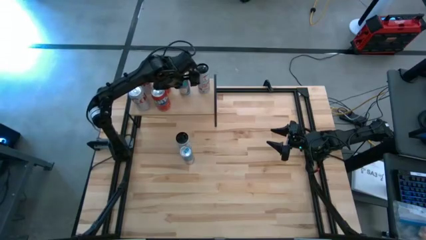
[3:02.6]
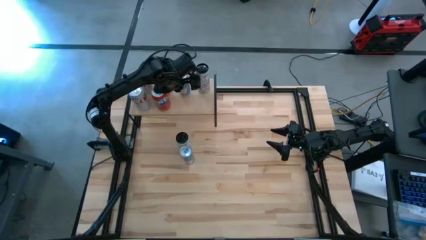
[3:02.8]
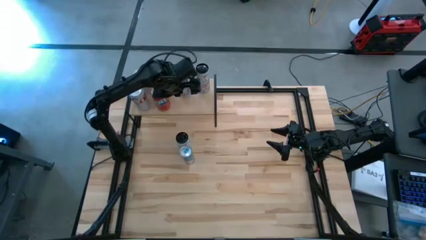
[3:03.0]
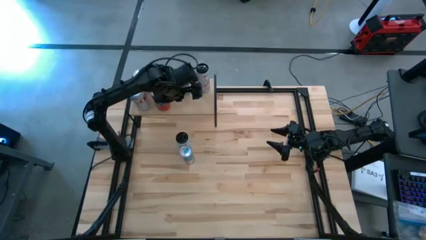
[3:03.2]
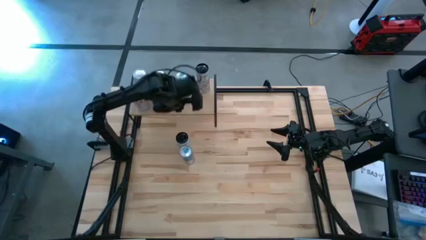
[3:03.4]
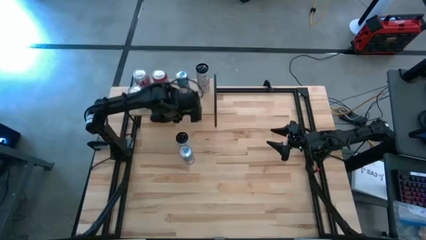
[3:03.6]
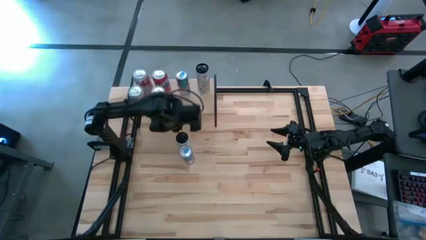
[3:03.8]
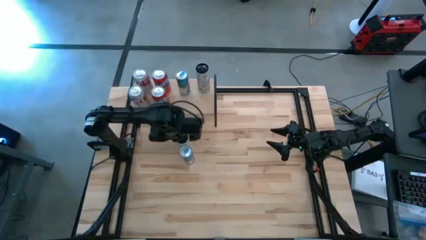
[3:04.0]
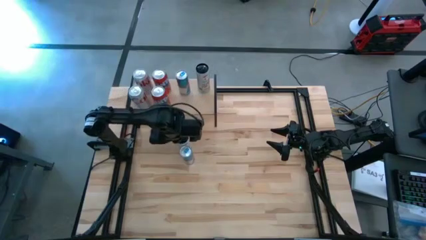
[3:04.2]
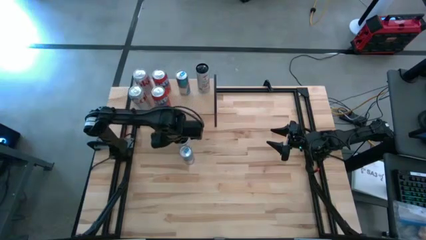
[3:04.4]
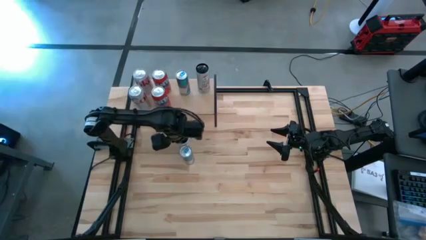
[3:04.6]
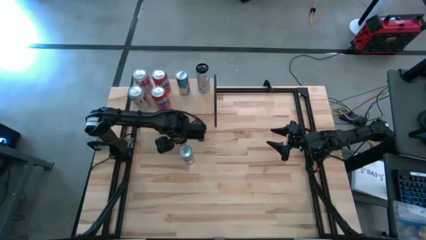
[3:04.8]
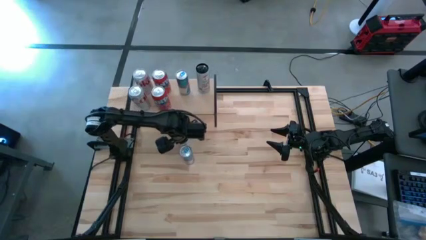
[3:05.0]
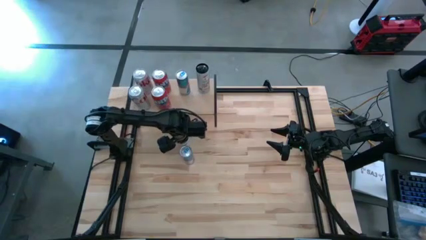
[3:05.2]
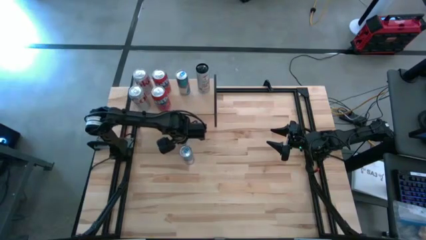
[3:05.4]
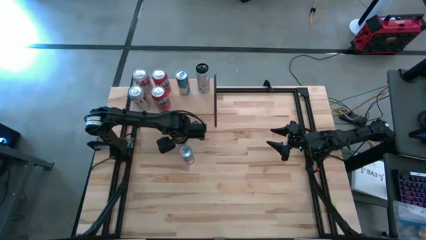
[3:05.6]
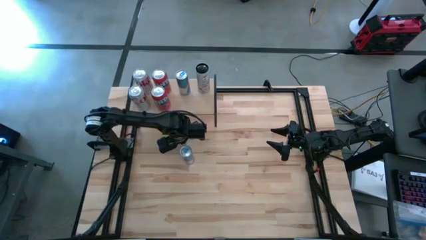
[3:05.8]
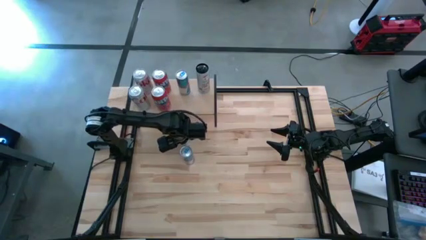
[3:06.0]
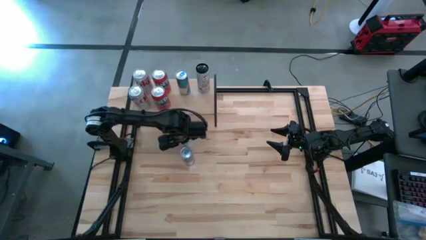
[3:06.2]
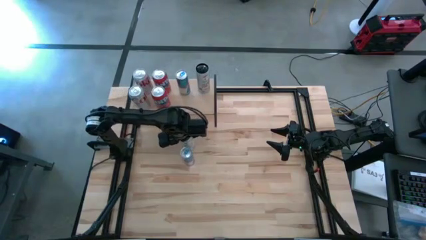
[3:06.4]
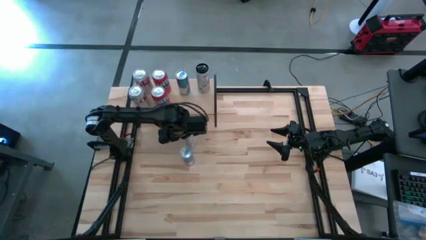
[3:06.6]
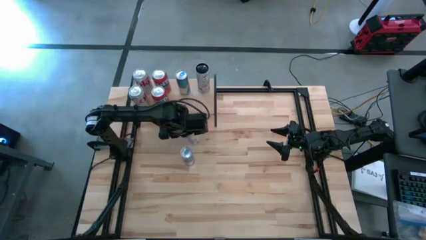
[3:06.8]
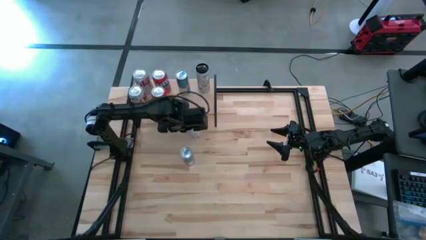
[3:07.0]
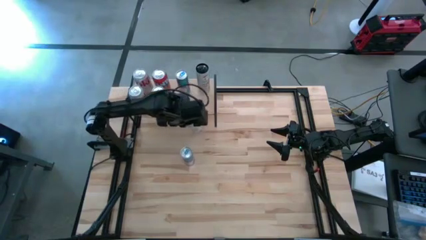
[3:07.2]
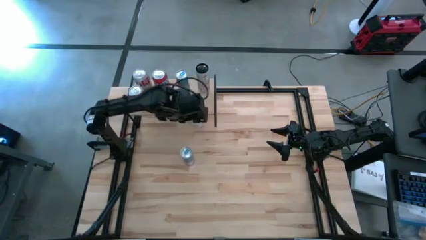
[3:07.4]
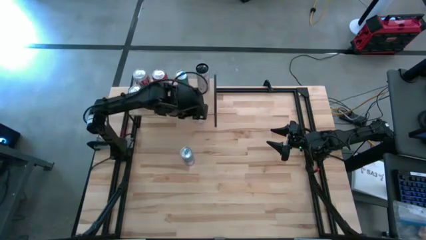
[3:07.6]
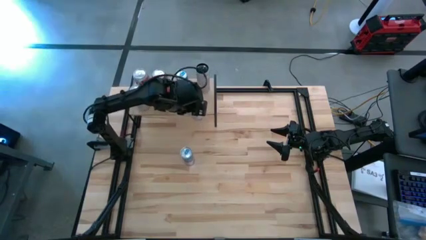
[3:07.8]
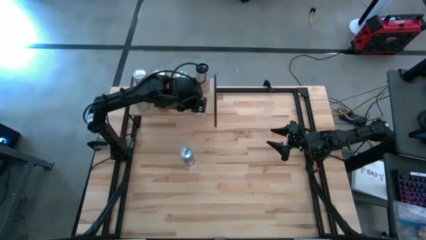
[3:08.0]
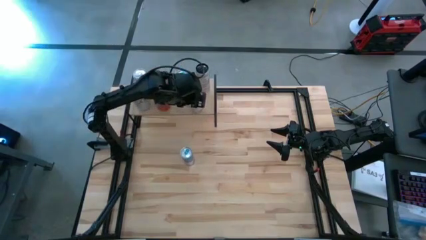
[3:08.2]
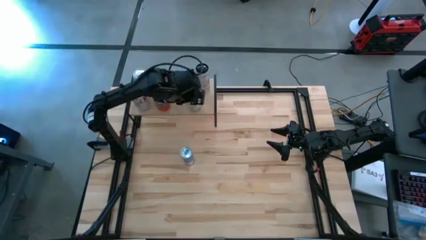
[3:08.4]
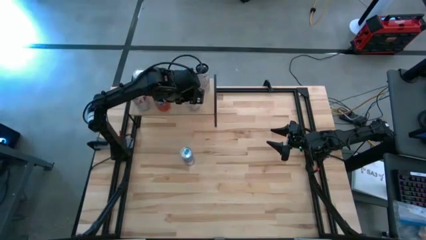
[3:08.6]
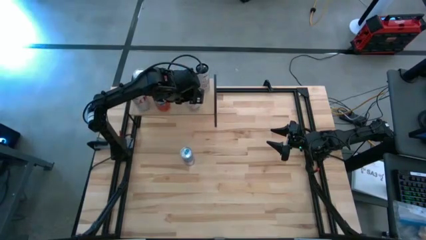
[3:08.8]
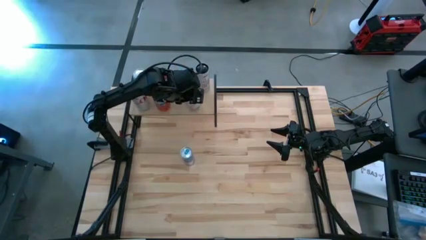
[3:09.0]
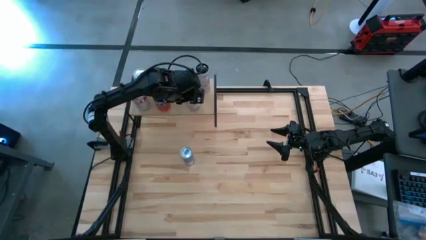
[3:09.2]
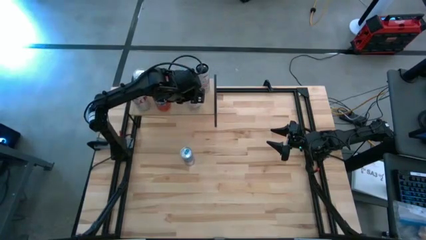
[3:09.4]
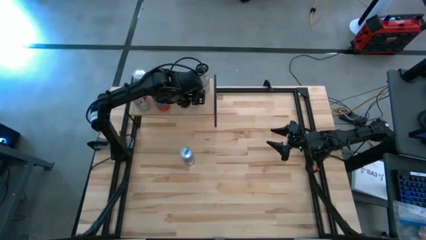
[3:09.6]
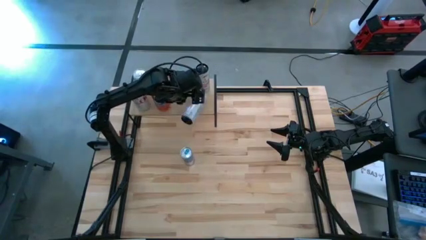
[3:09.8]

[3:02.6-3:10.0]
Task: Place canned beverage on shelf
Put the white and pink soda can on the shelf and align it with the other white and pink soda can

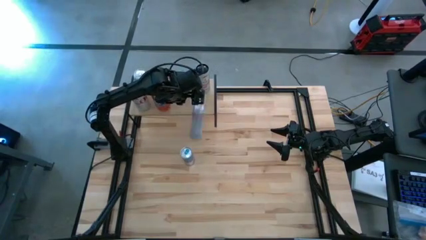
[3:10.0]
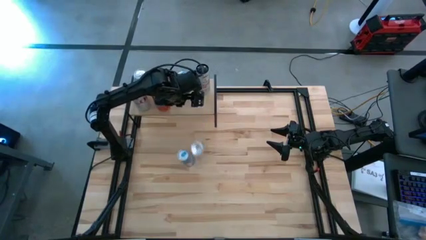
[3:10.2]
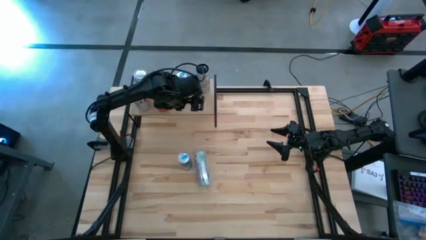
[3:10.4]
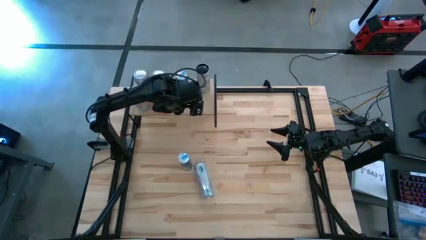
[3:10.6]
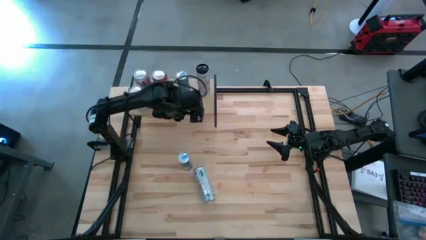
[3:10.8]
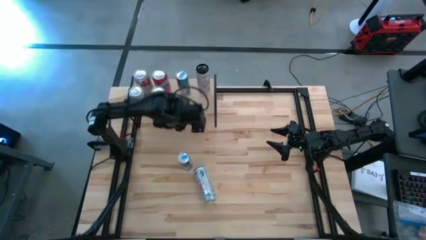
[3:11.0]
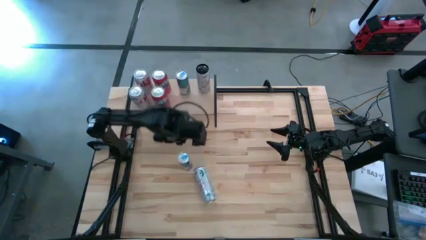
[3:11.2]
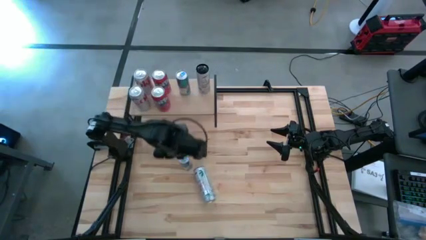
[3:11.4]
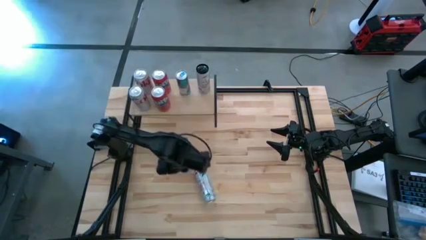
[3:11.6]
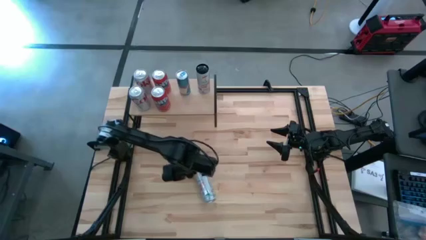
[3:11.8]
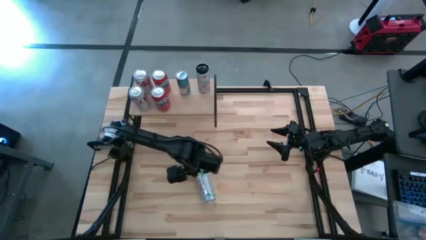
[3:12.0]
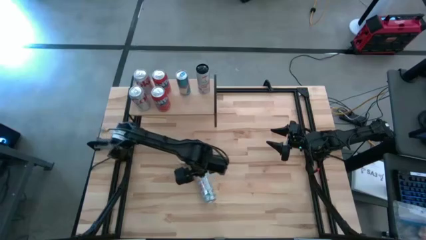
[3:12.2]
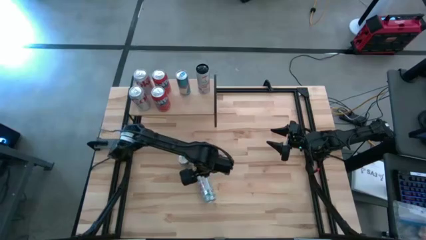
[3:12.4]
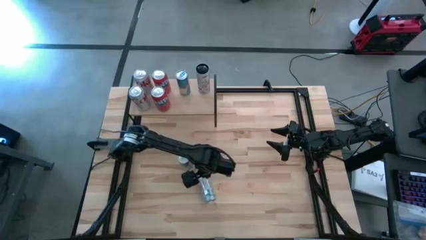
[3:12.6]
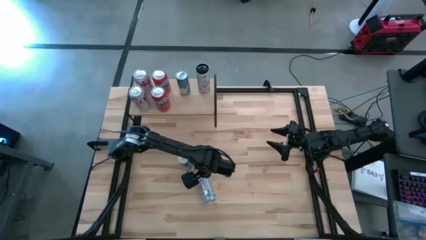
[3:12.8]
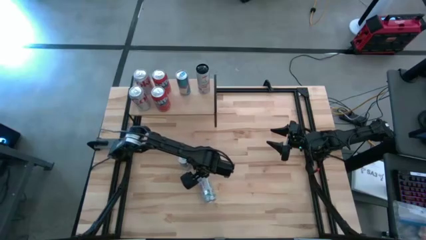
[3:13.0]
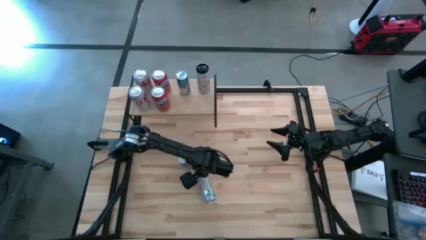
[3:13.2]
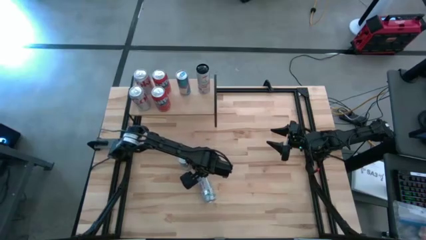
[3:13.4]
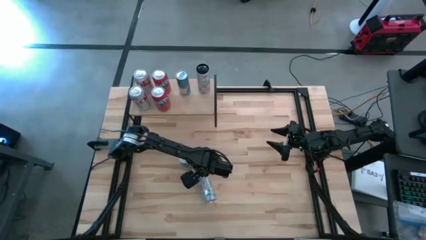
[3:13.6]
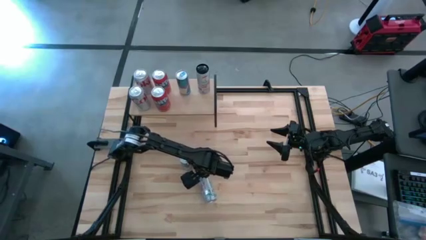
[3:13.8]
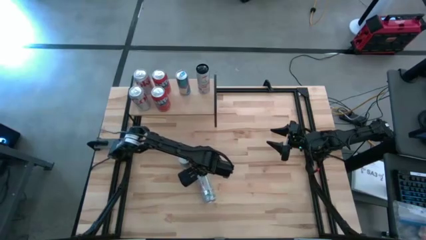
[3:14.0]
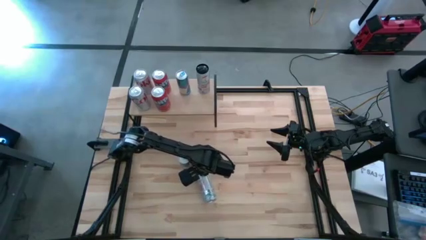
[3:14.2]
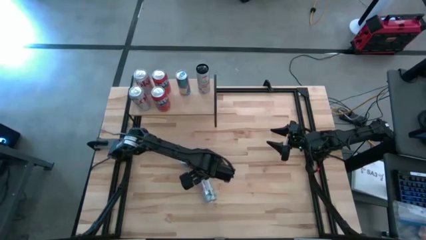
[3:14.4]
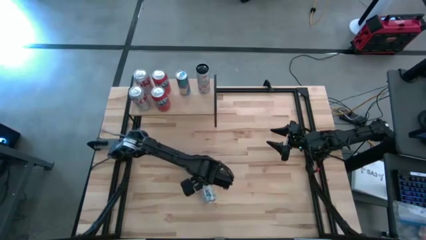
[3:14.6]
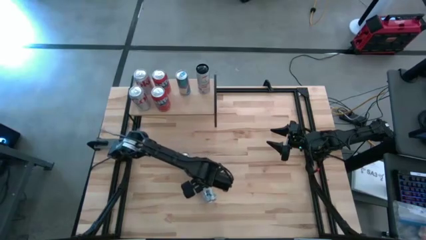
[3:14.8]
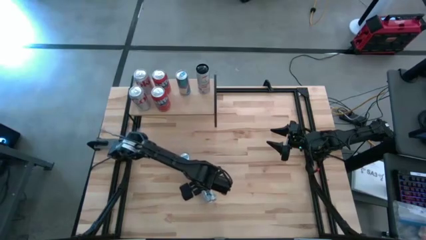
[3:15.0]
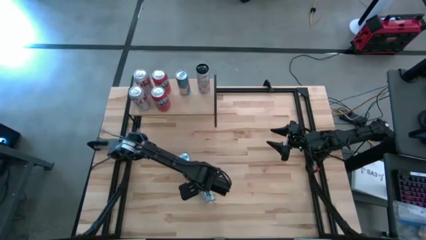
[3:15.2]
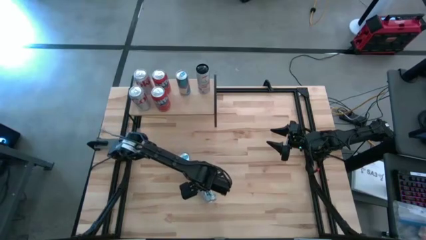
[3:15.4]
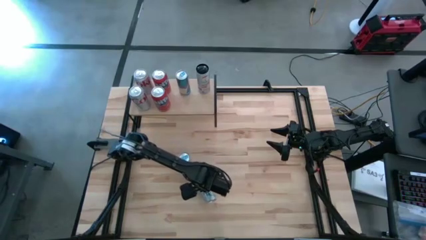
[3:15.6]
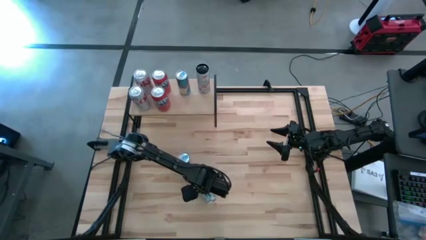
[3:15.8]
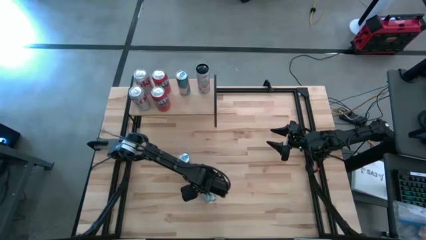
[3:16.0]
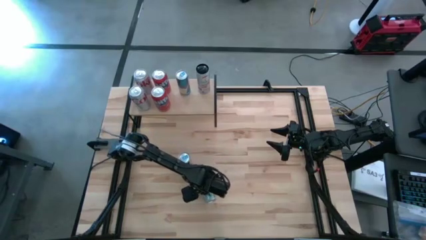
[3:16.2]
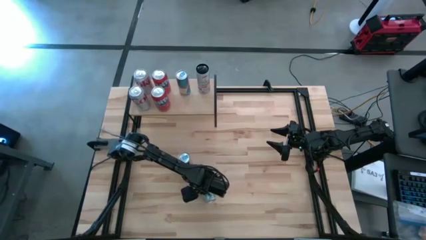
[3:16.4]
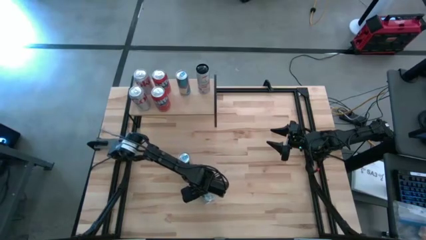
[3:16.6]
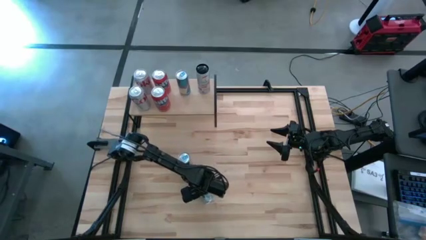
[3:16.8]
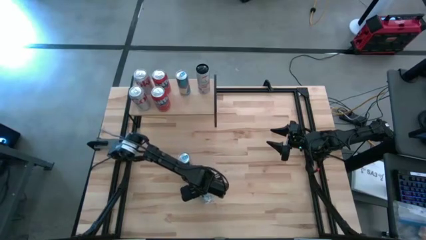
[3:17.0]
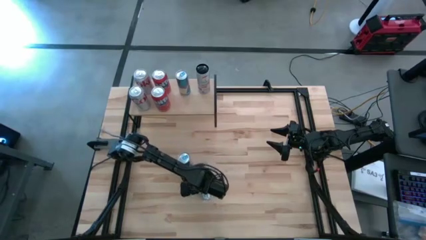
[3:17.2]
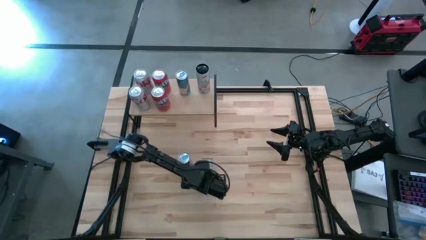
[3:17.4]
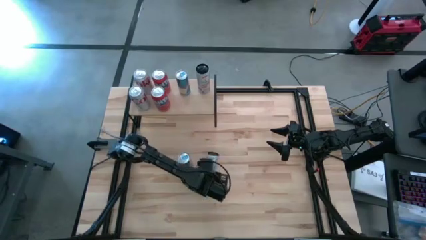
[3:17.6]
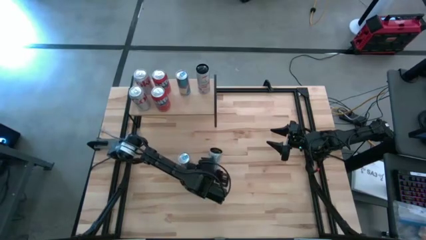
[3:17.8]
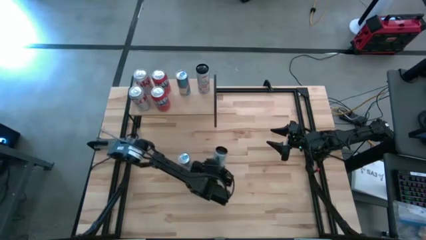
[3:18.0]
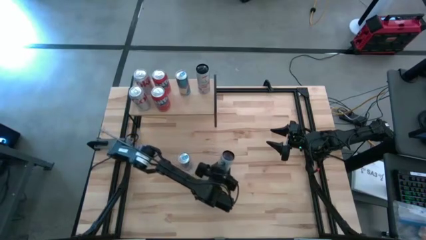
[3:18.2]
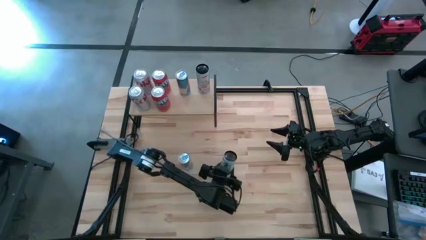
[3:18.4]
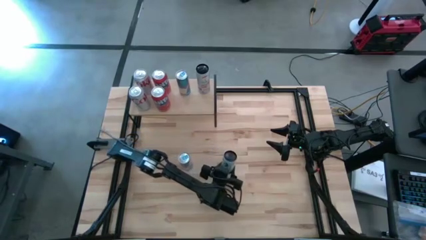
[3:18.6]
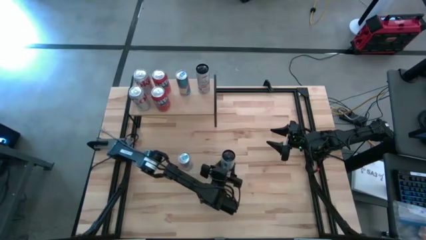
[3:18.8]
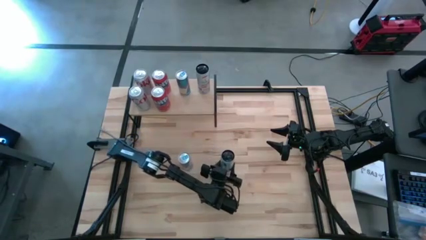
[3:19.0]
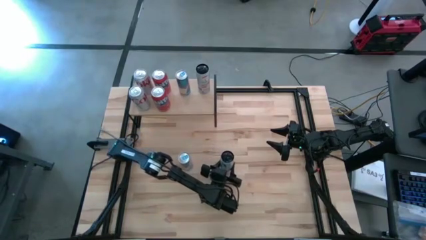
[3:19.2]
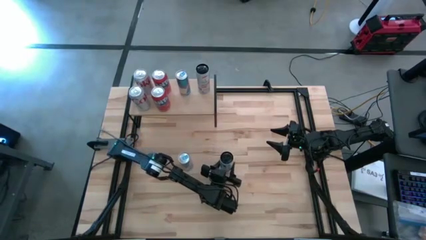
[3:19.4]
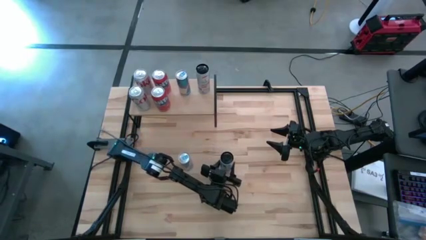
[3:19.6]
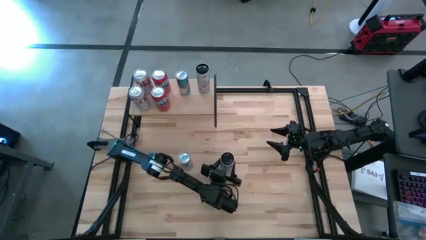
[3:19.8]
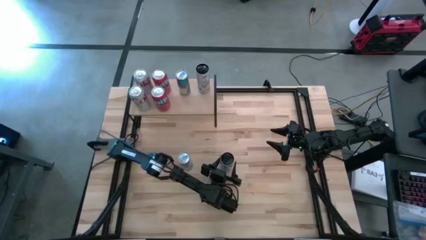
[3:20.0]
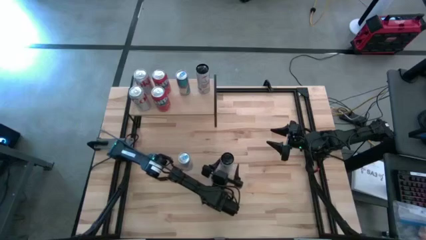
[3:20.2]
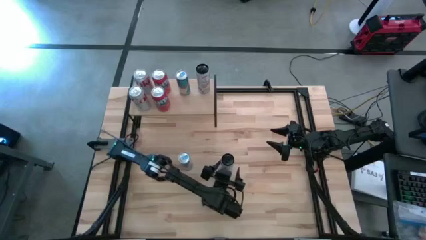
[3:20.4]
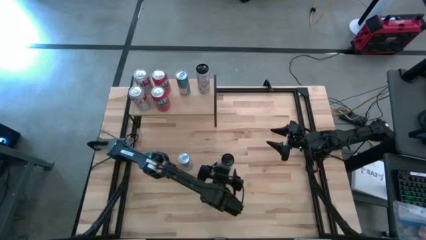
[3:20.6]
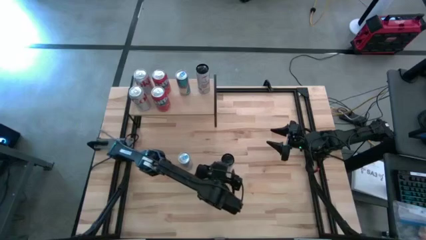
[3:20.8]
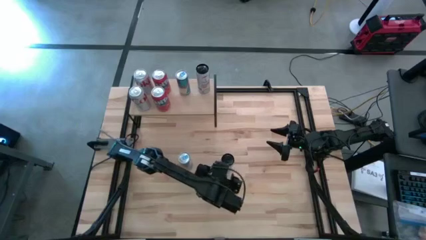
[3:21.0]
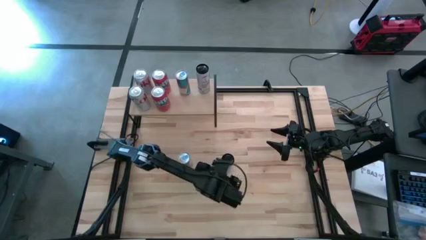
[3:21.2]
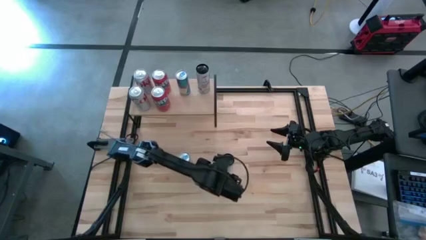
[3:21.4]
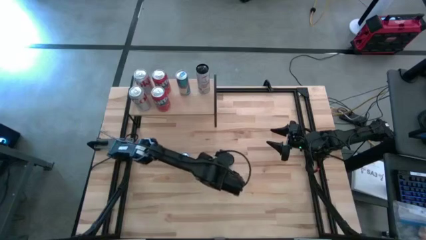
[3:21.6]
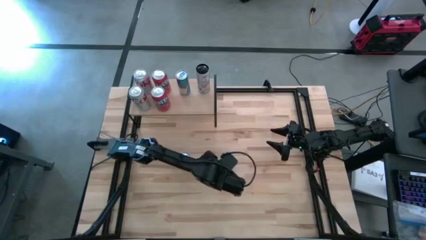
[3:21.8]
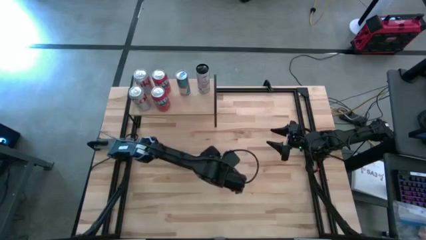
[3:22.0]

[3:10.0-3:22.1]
Put the white and pink soda can align the with the other white and pink soda can on the shelf
